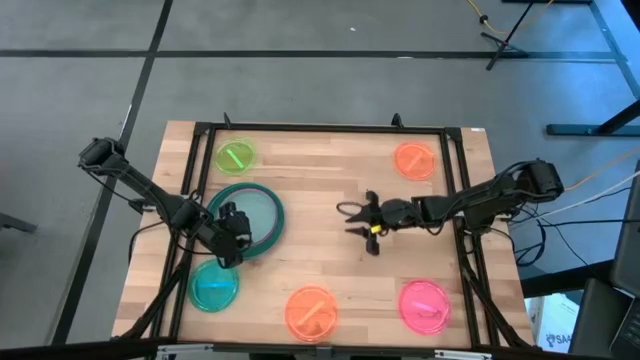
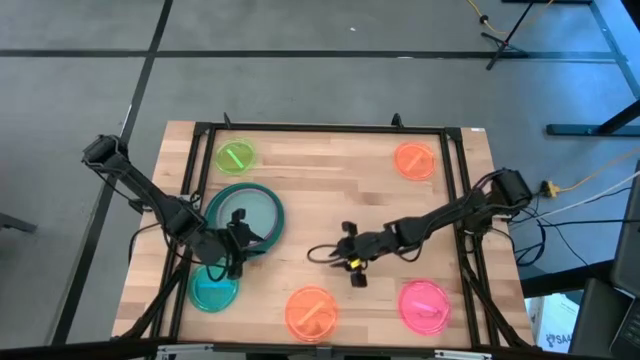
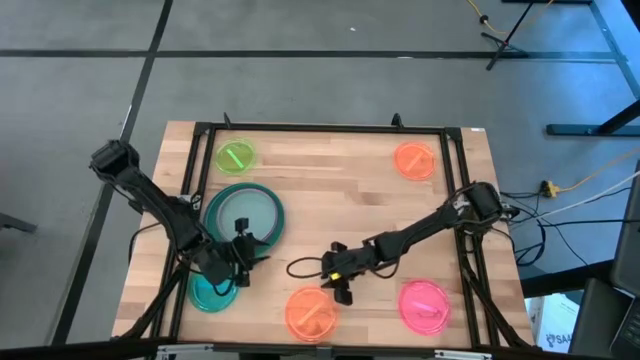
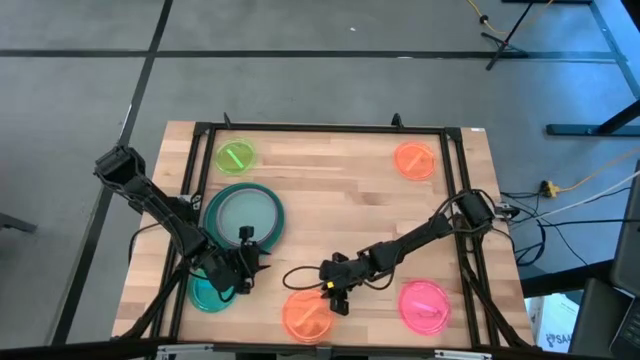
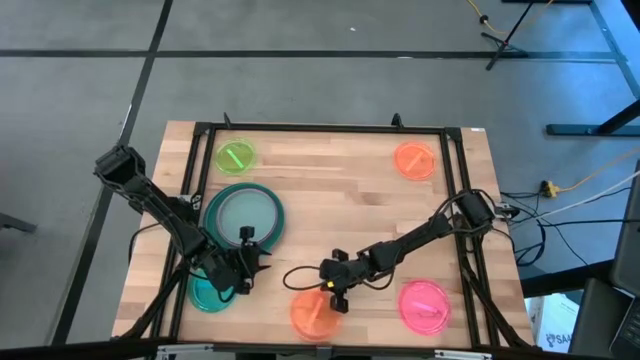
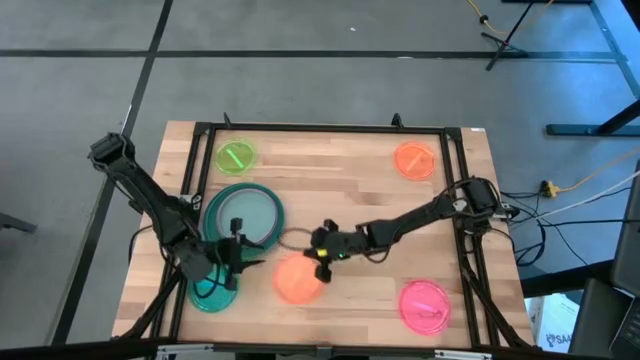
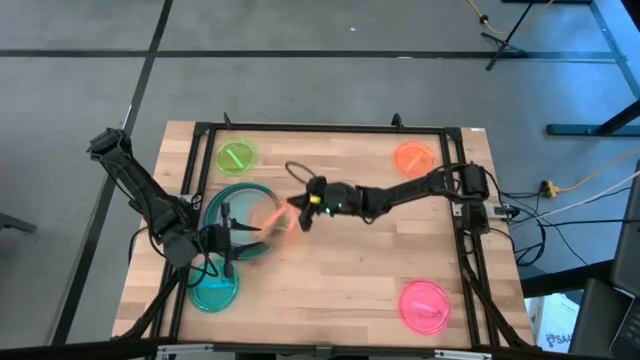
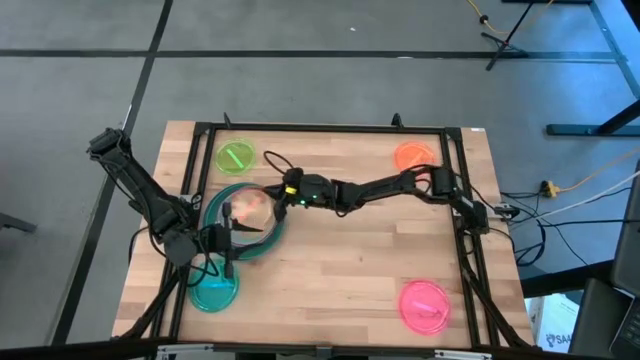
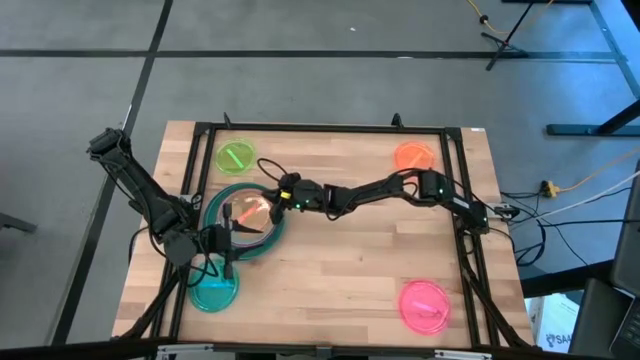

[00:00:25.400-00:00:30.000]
Task: Stack plastic plates
Stack the bottom orange plate on top of the light blue plate

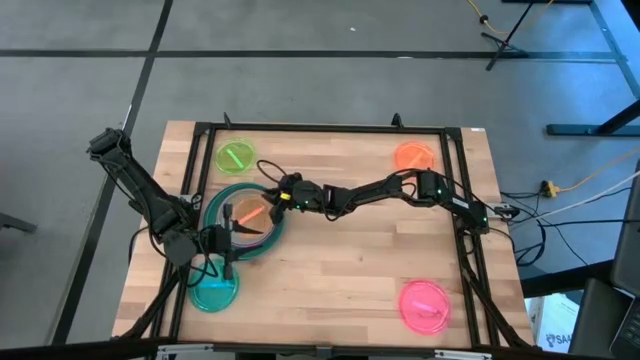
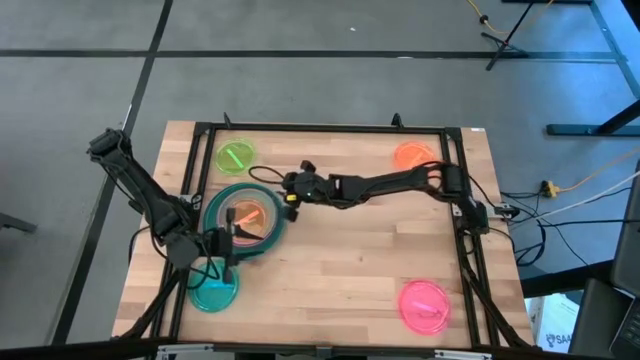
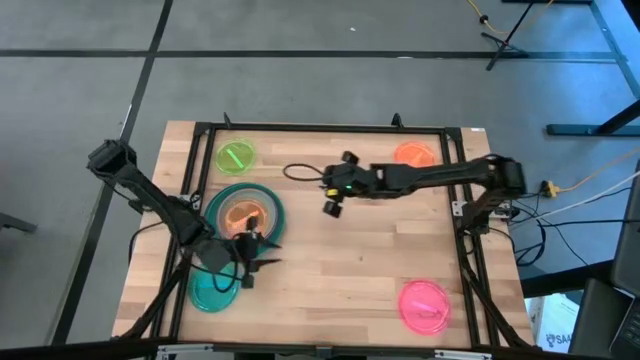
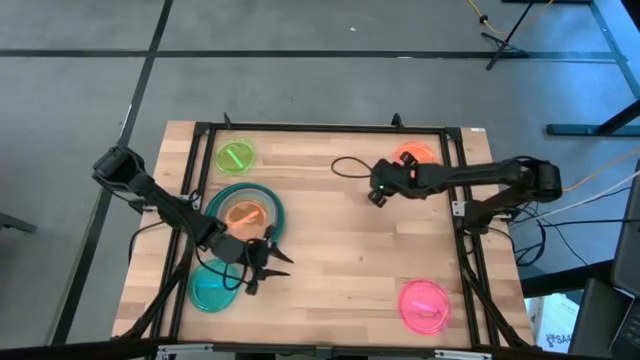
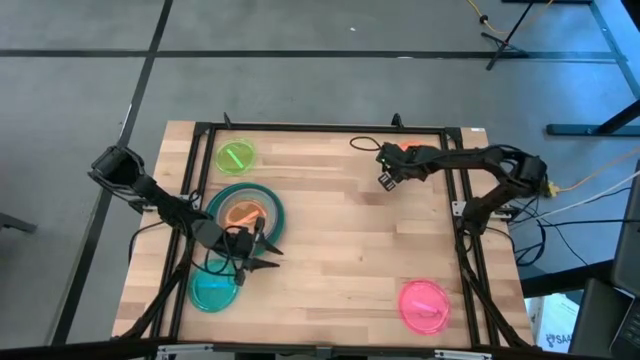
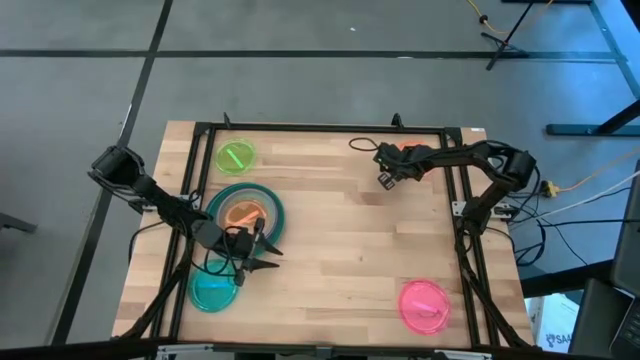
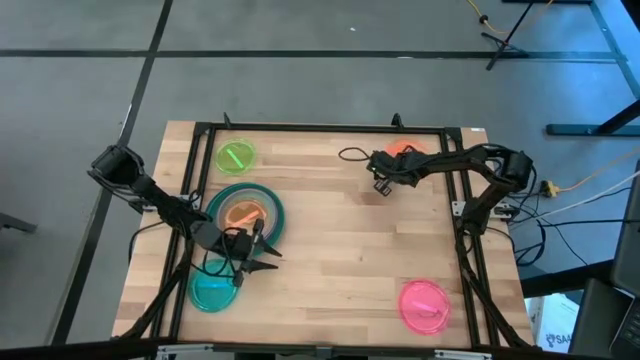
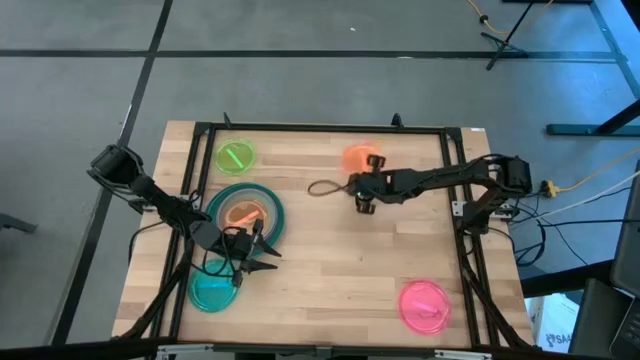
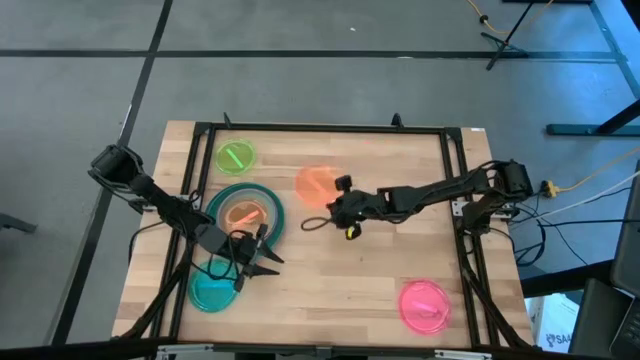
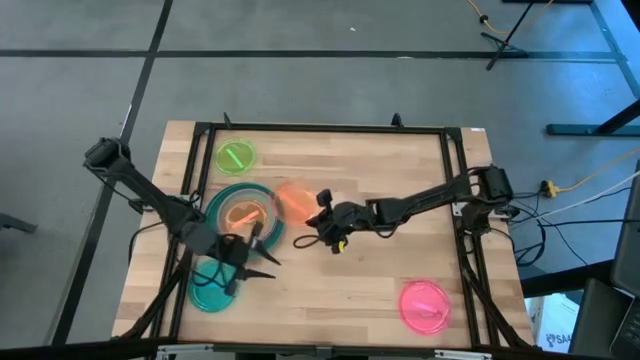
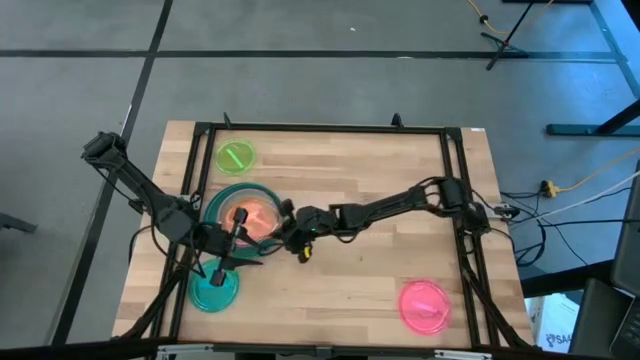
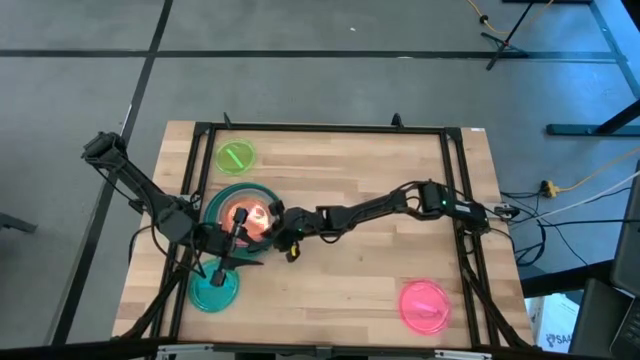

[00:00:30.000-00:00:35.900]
Stack the orange plate on top of the orange plate

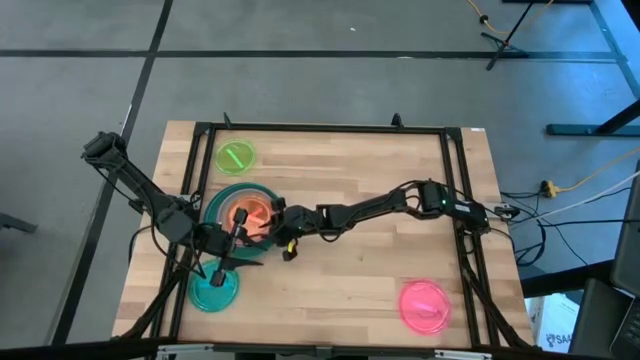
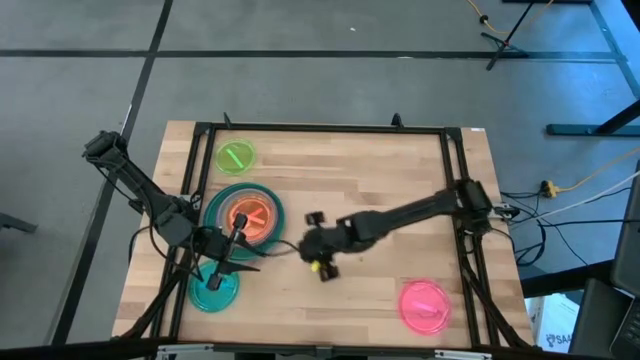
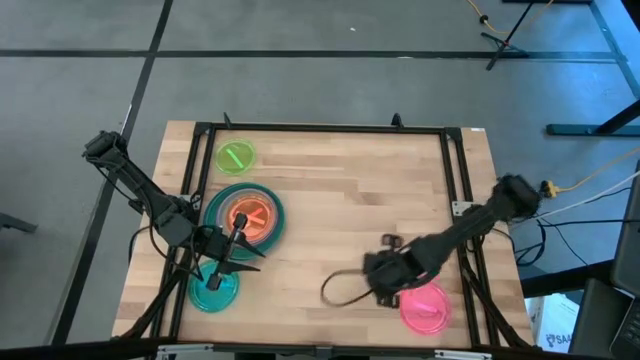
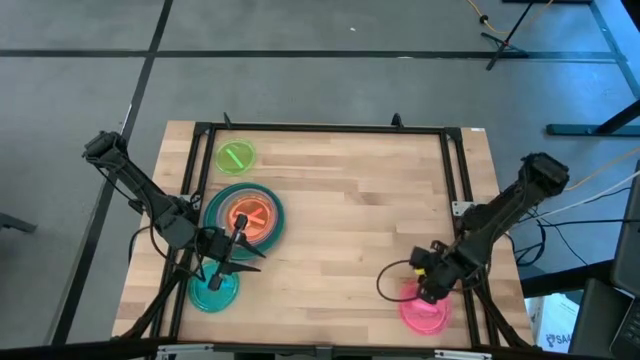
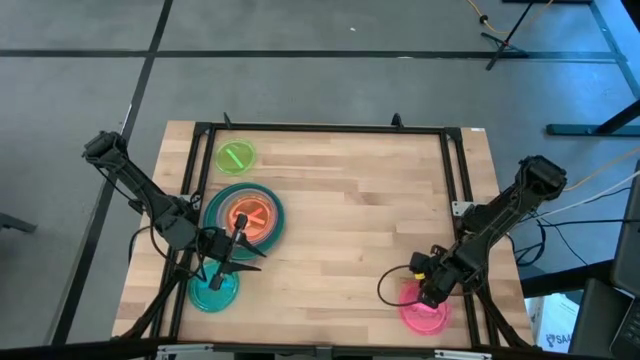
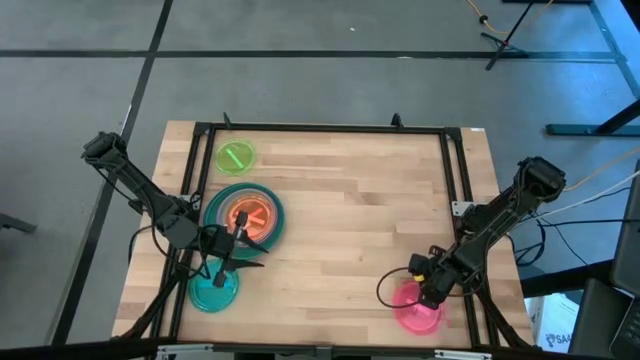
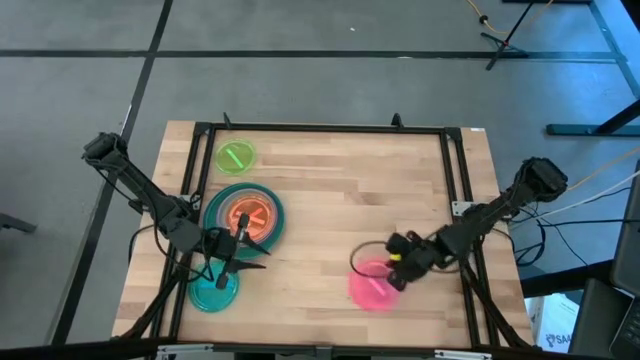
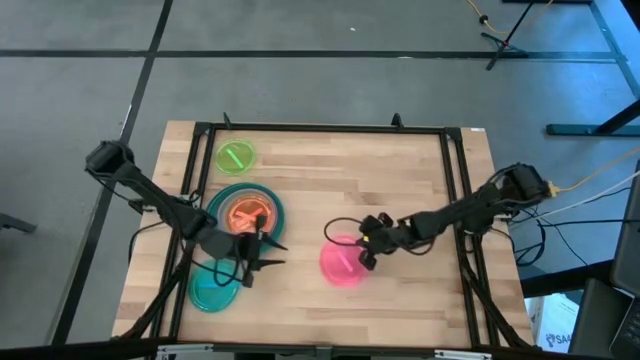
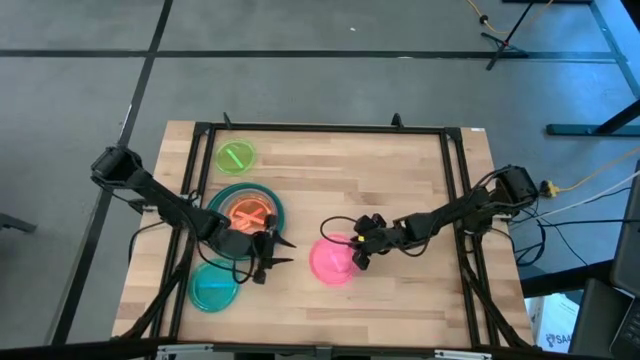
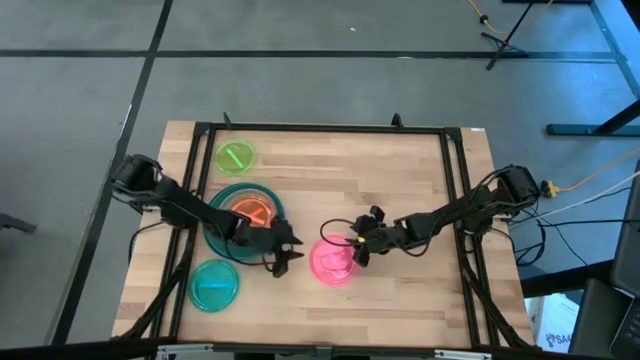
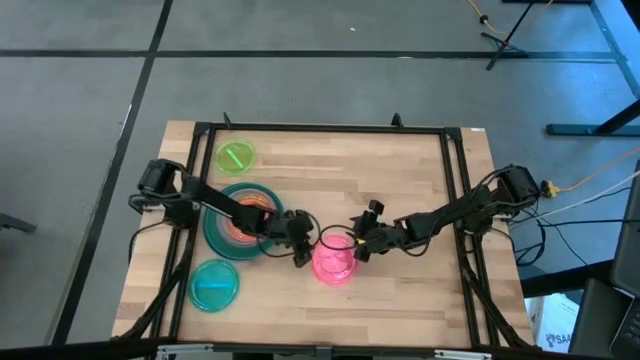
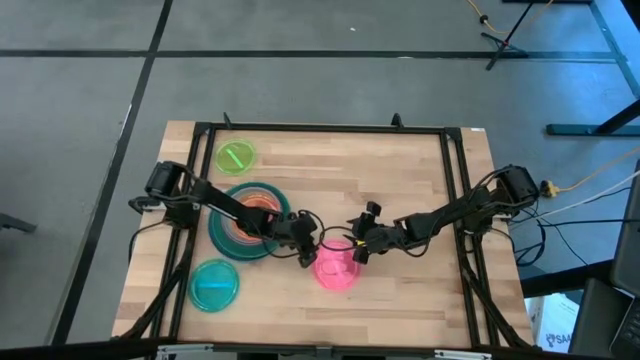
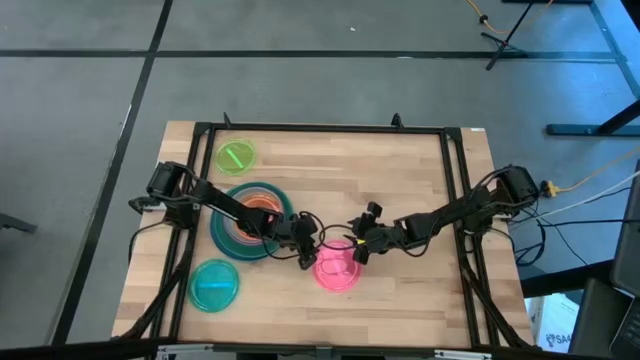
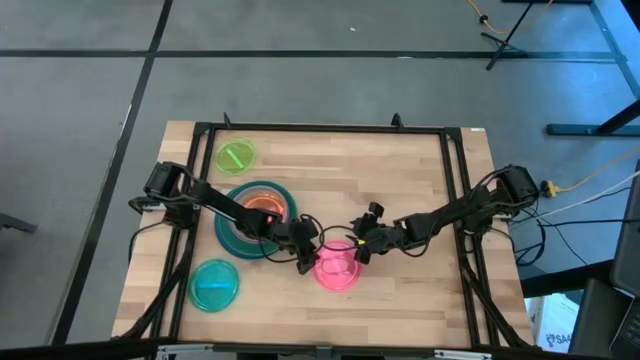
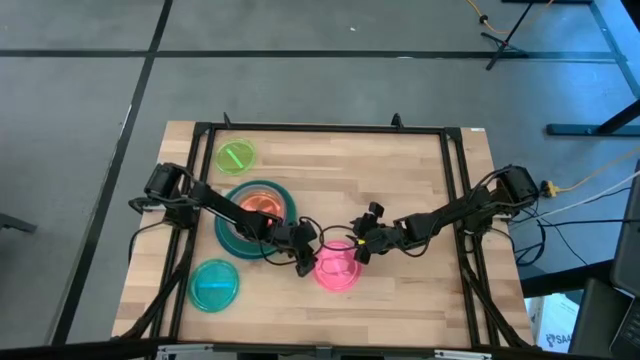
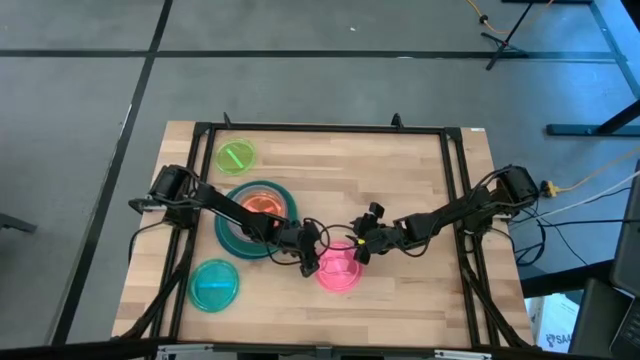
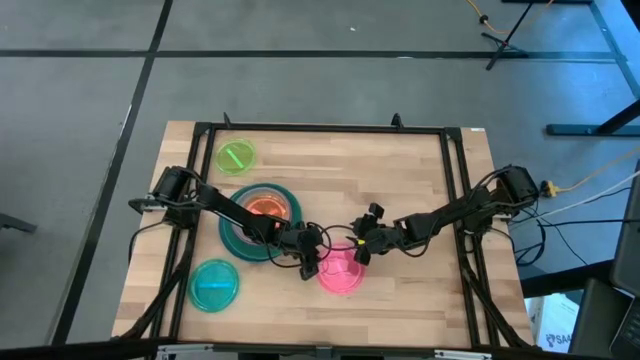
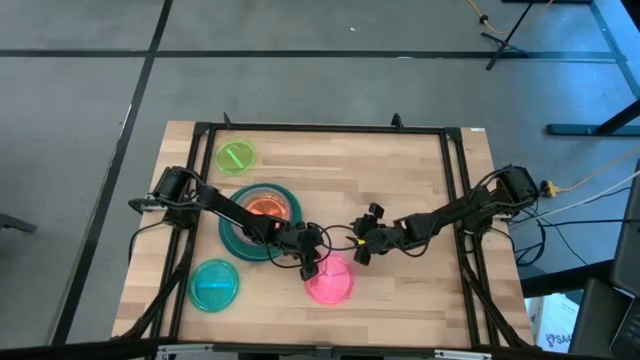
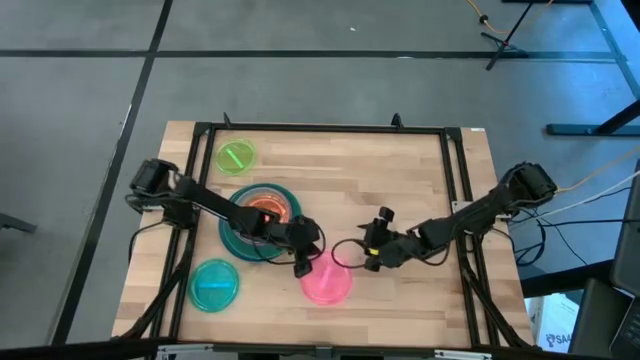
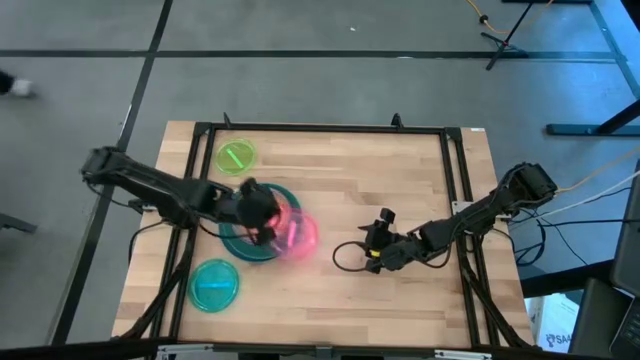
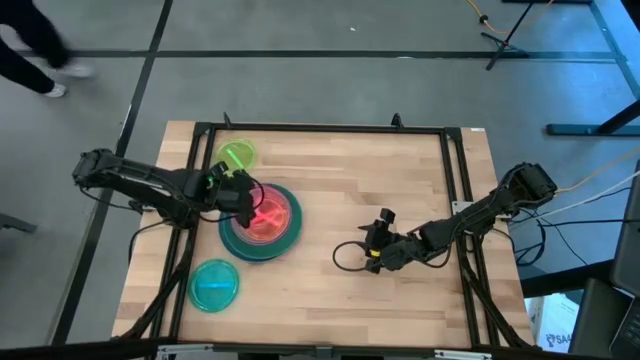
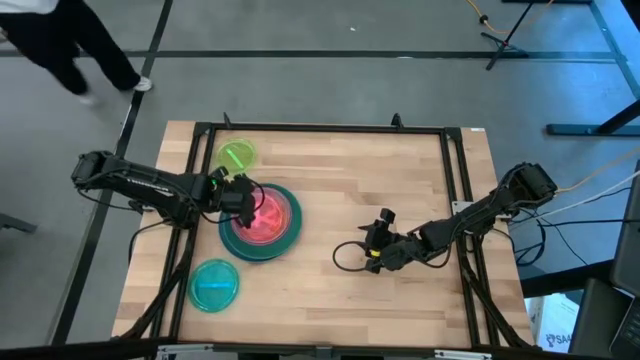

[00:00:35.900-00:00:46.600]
Stack the light pink plate on top of the orange plate
